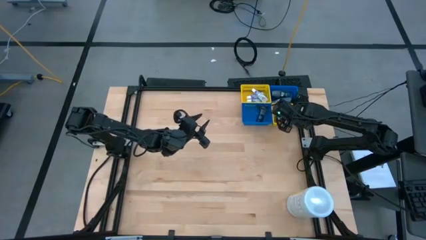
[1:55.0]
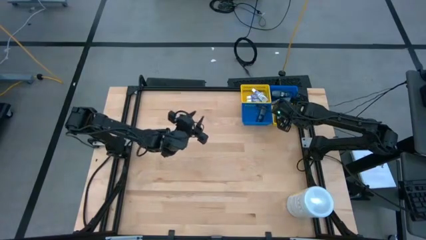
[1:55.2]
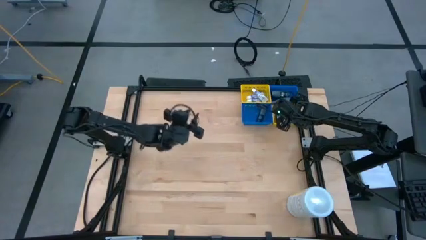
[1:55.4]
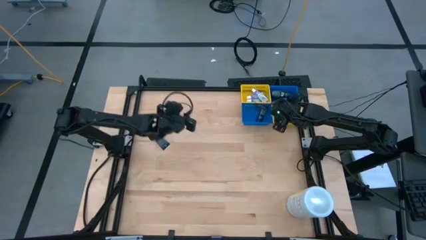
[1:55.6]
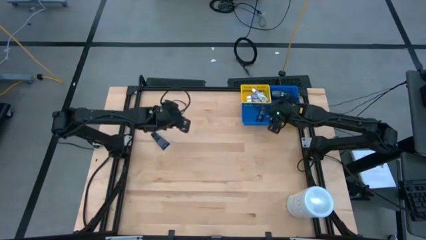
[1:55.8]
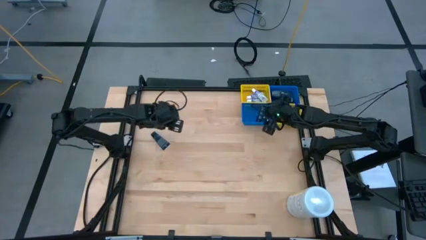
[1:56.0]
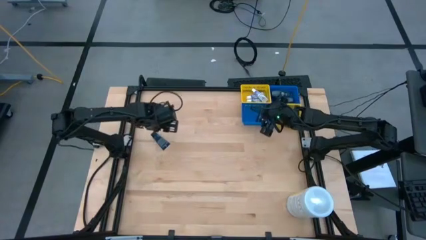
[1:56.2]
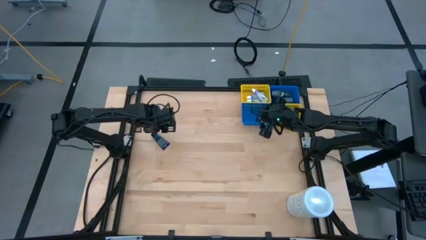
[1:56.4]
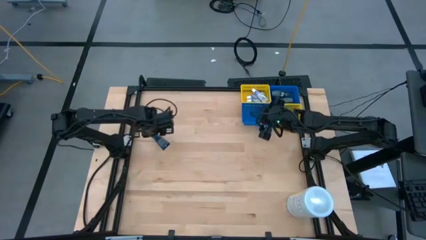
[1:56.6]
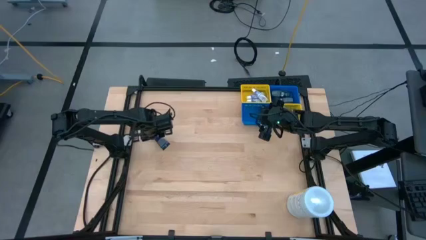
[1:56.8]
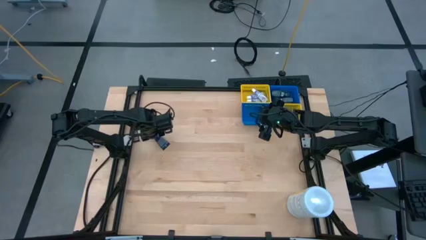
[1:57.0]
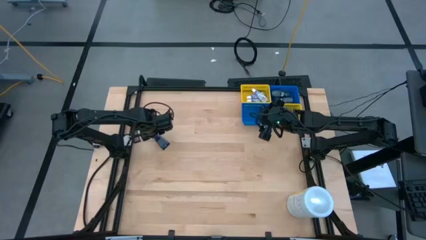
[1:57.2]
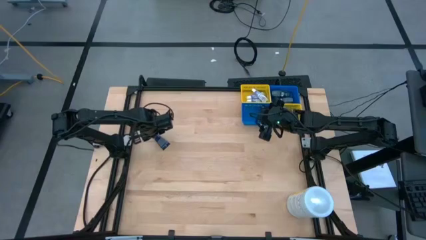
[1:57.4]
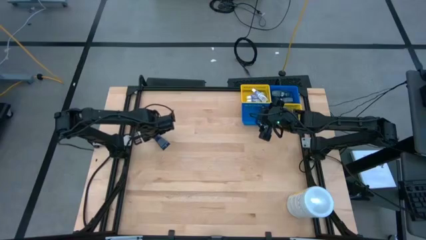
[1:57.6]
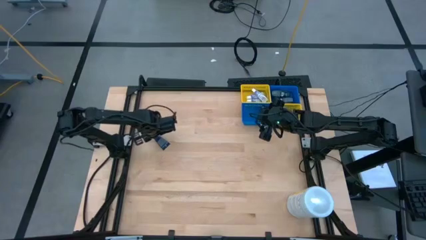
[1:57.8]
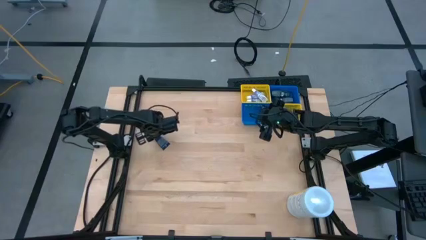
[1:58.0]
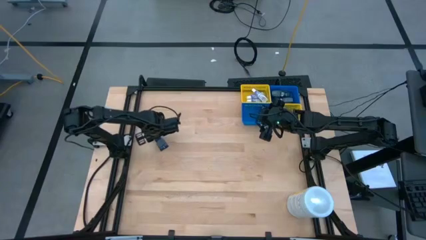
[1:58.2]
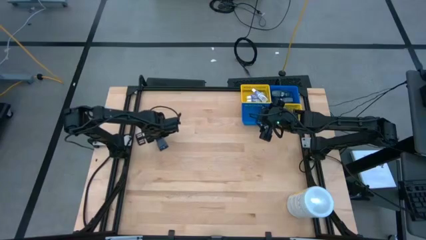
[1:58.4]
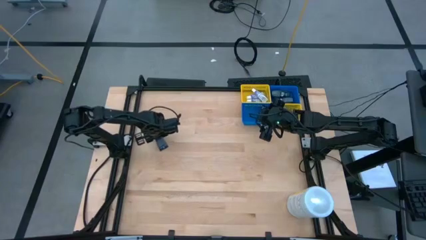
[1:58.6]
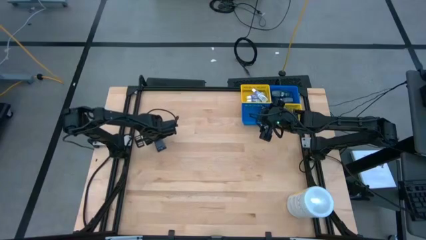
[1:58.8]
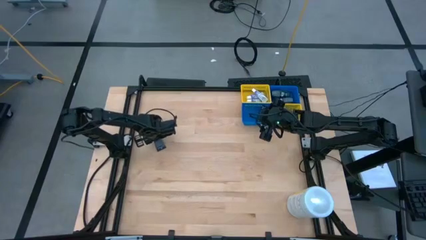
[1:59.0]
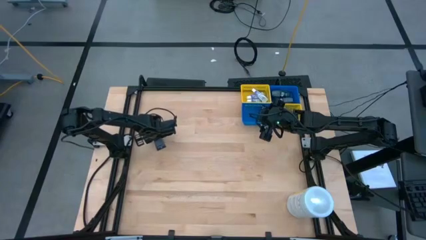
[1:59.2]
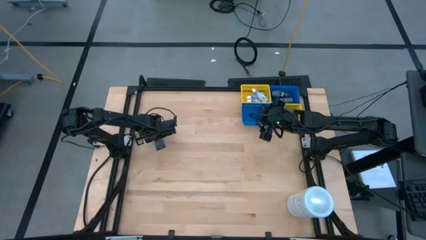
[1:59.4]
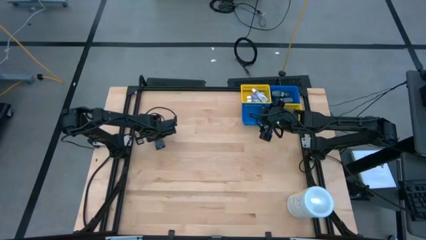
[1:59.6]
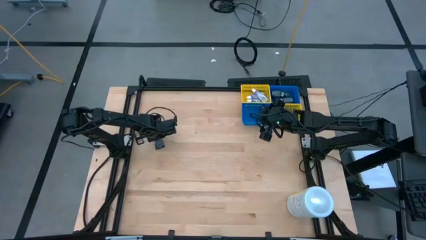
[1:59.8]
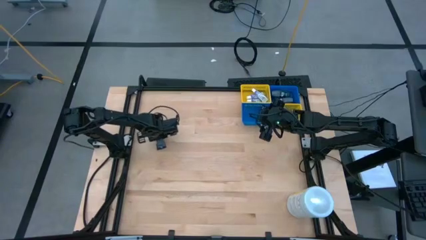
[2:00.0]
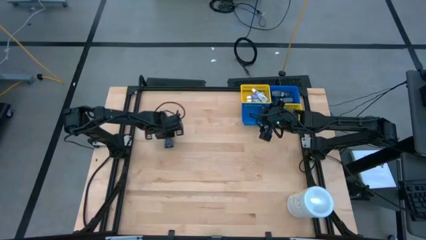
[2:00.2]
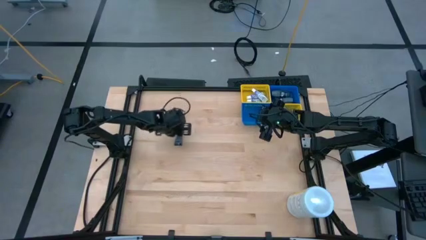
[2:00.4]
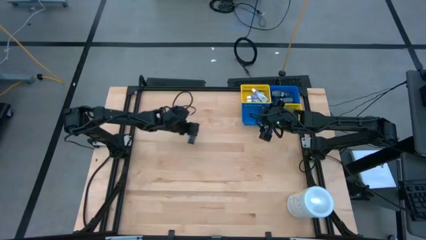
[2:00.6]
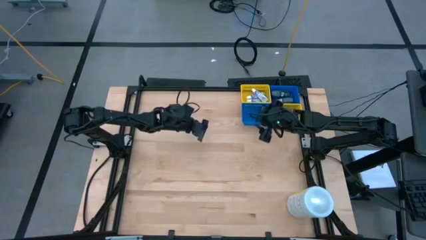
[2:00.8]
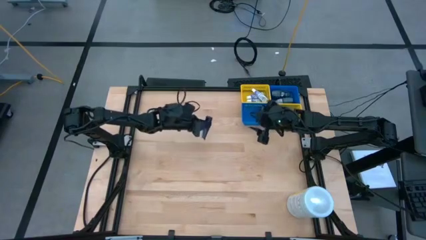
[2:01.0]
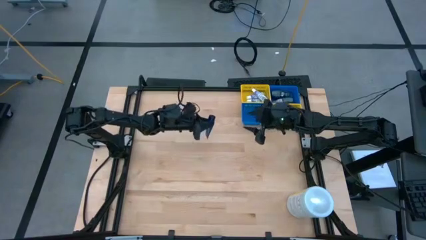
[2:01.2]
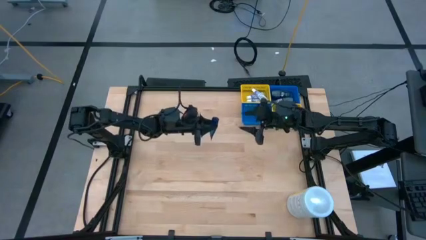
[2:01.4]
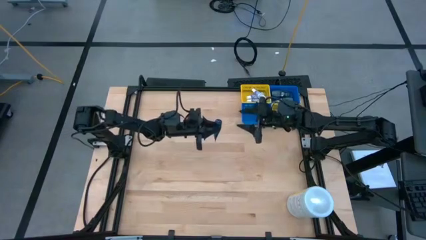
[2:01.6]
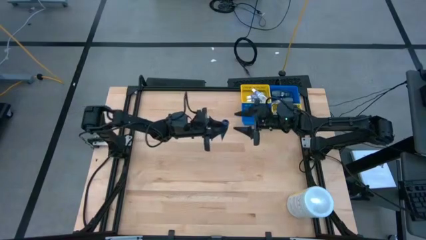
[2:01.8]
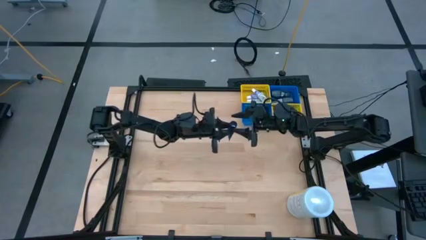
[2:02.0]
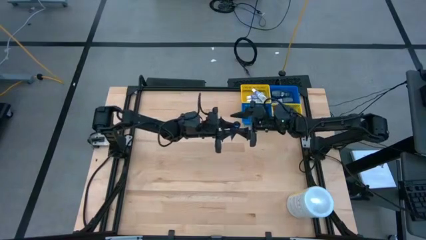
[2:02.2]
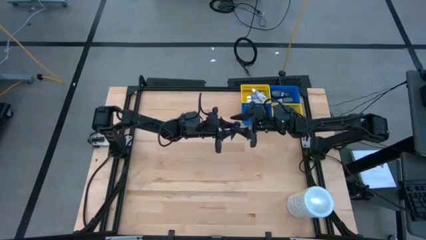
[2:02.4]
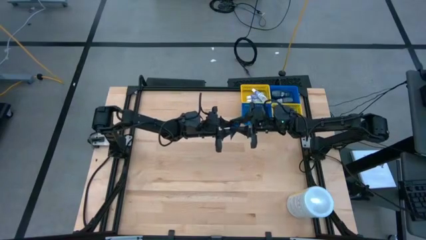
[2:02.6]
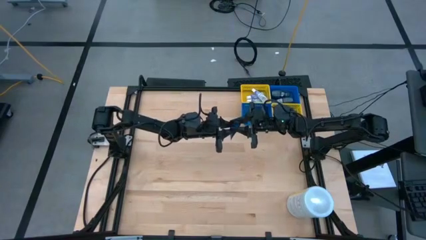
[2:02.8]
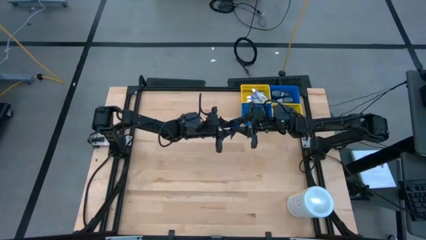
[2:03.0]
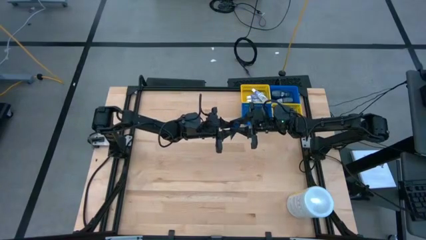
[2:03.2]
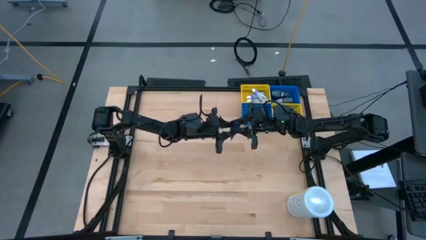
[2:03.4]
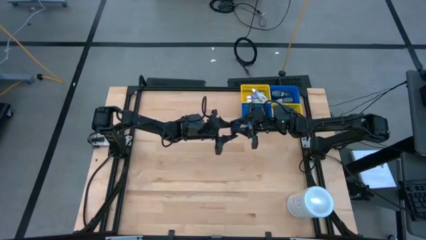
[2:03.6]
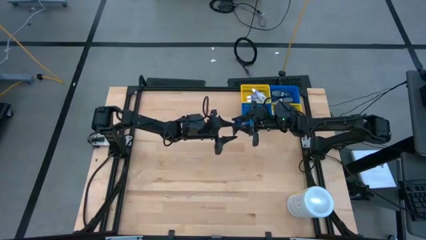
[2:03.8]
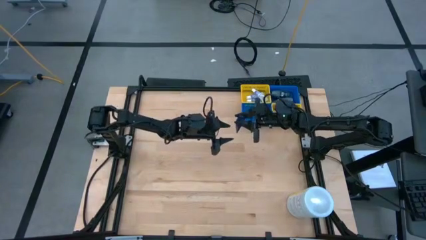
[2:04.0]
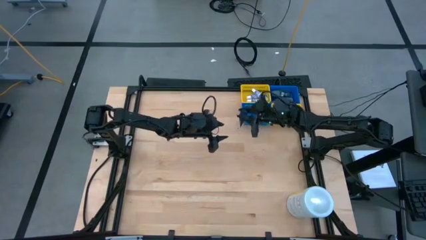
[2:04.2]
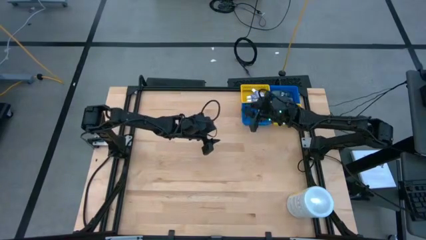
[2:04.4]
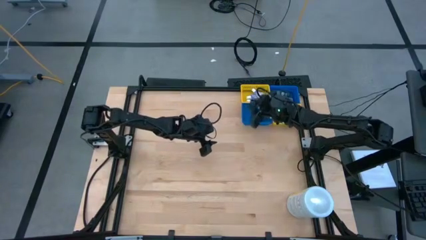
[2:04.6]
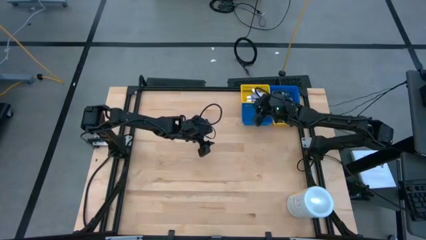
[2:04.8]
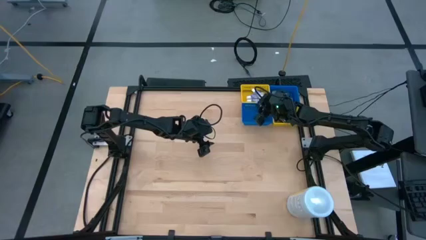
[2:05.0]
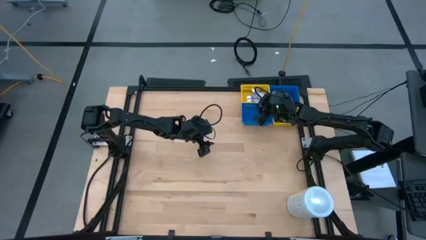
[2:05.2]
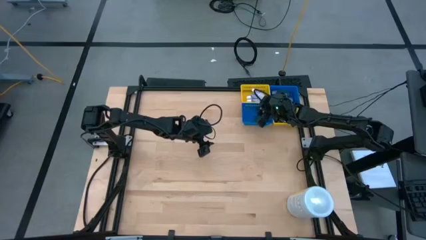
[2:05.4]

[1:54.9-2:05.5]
Task: Pick & Place Travel size toiletries
Put the blue shave cream into the bottom blue basket

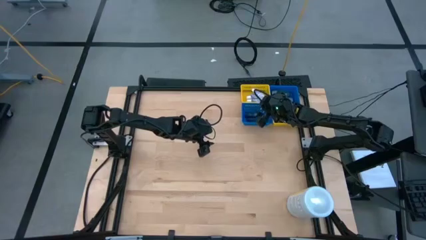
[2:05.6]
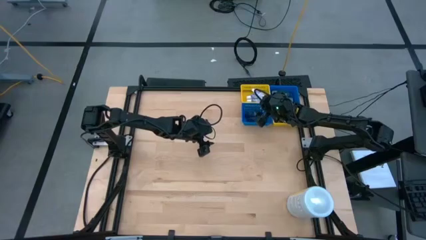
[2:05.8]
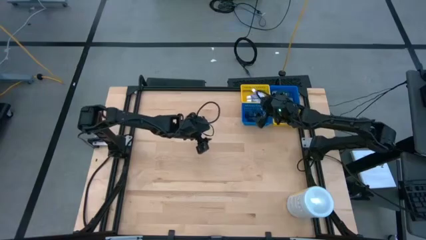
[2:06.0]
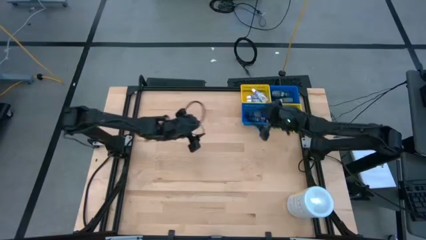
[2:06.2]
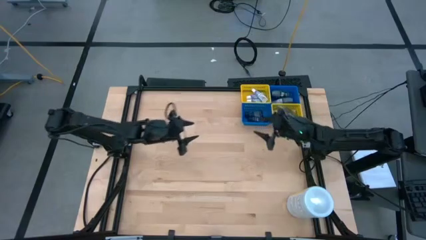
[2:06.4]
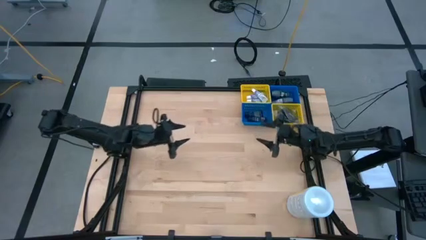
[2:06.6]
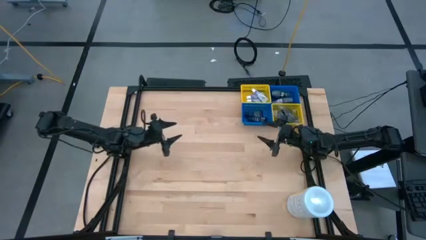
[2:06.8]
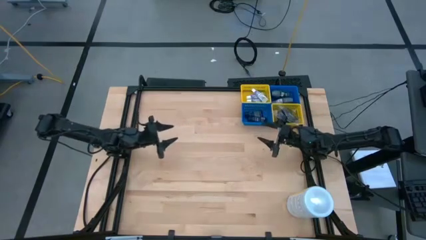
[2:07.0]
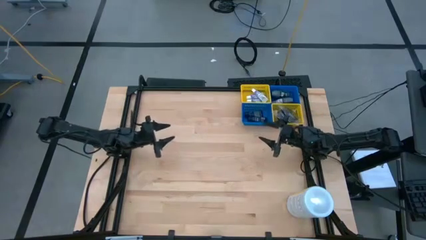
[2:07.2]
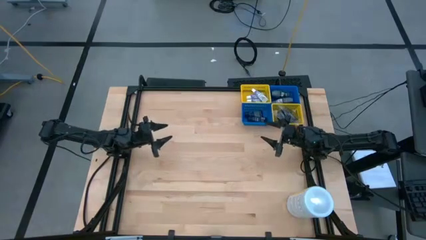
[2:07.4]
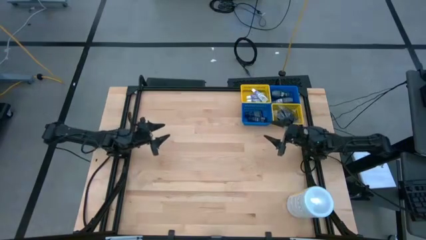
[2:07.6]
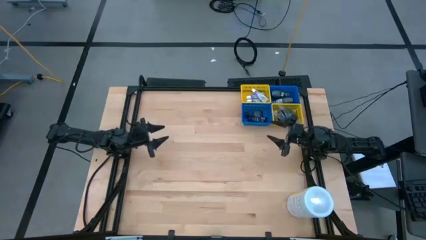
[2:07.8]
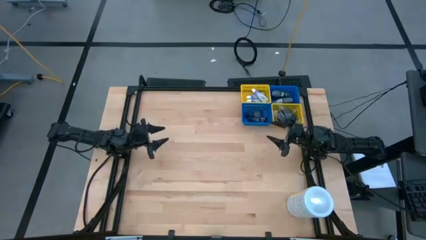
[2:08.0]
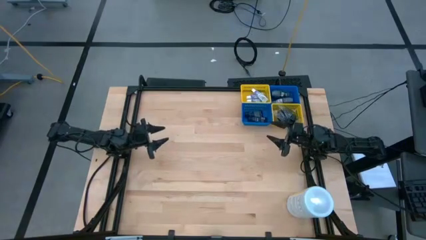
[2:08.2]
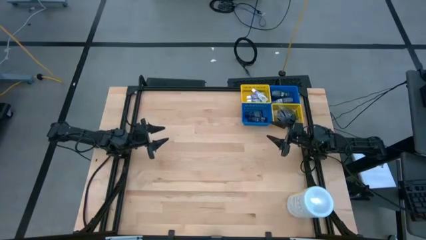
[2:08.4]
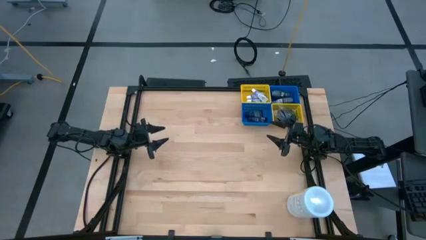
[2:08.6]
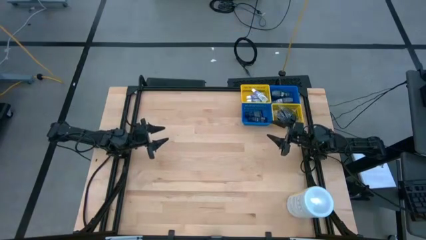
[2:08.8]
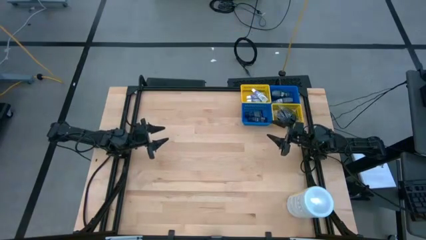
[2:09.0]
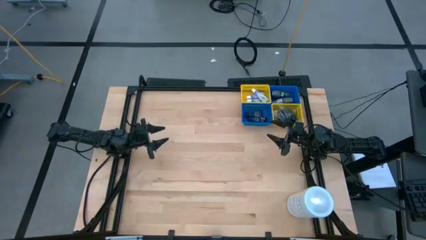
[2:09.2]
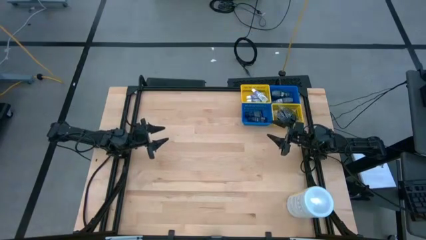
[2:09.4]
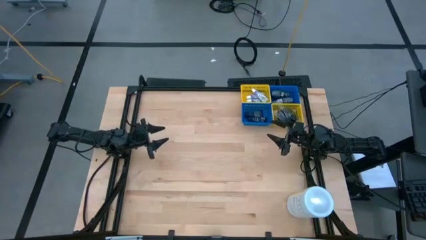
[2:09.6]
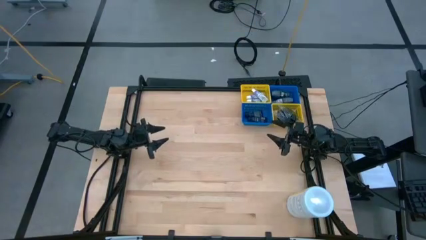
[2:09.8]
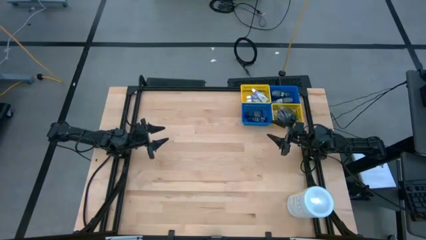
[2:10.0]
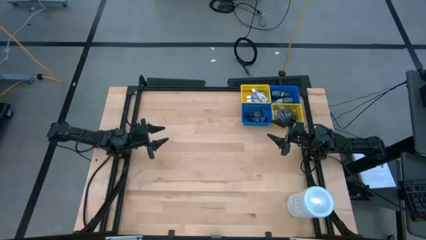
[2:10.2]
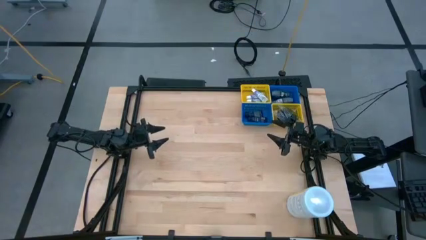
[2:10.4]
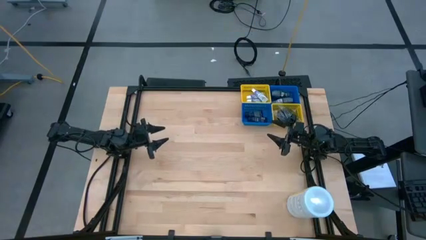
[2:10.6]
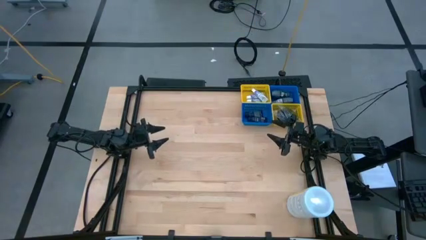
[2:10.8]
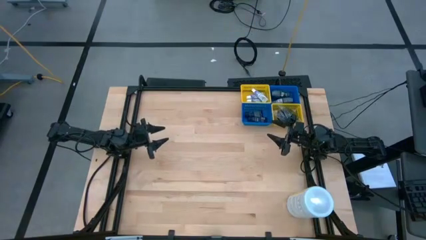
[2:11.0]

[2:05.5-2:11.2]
Return to Home Position
